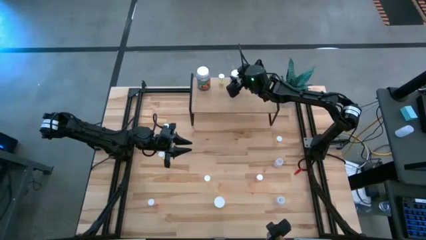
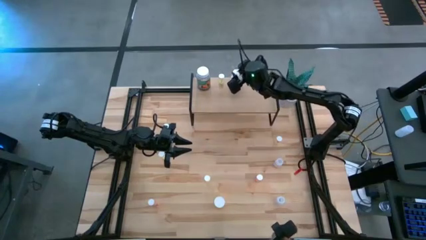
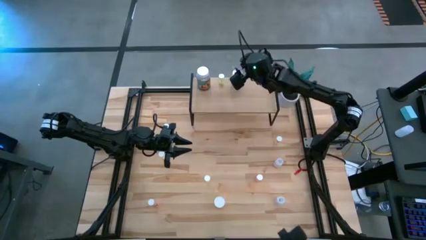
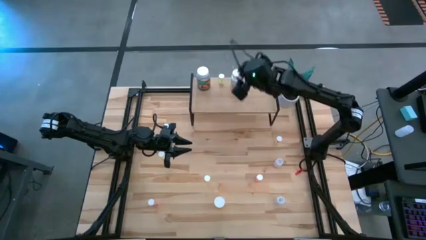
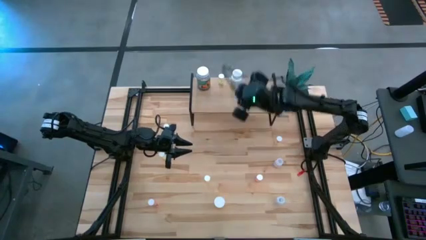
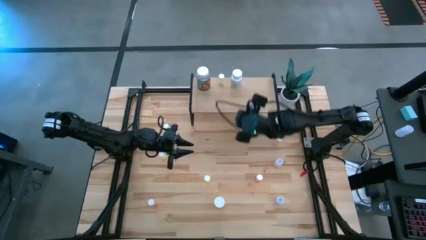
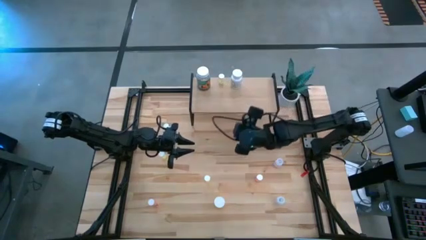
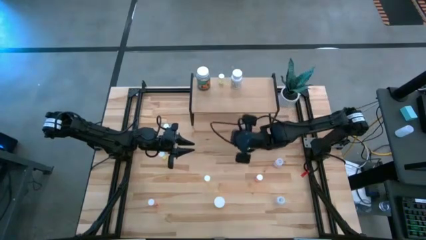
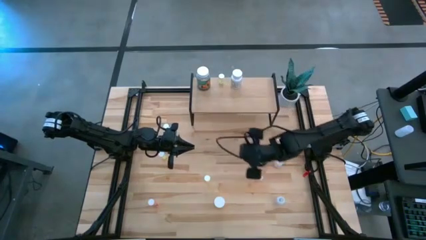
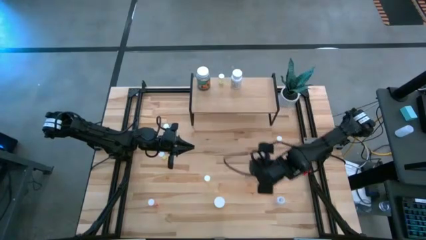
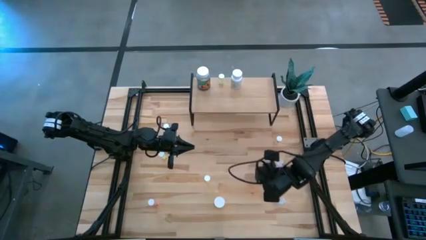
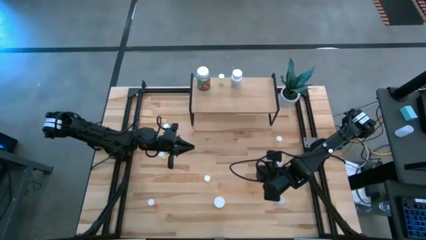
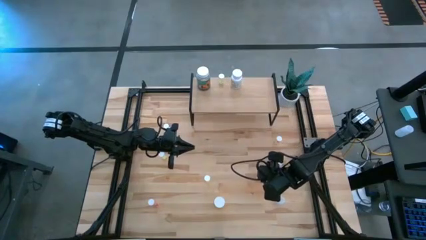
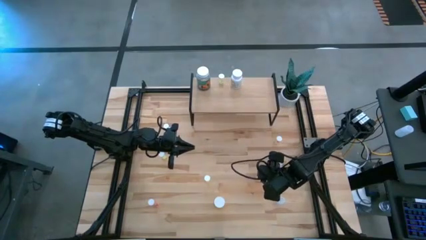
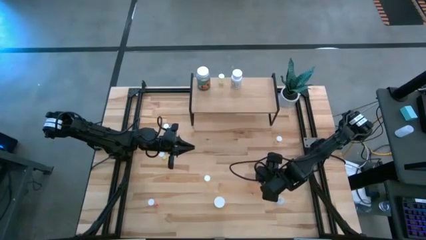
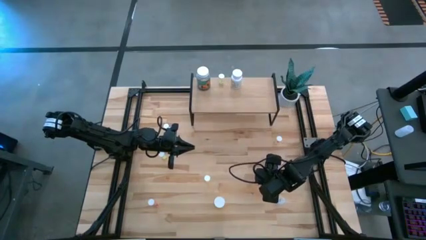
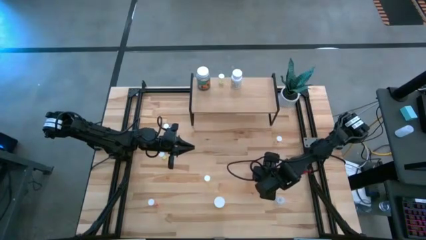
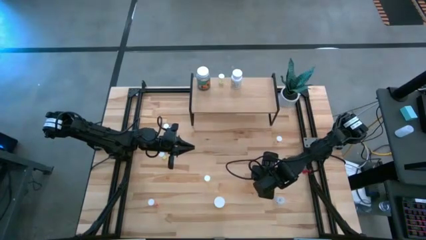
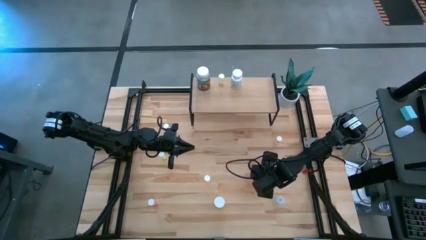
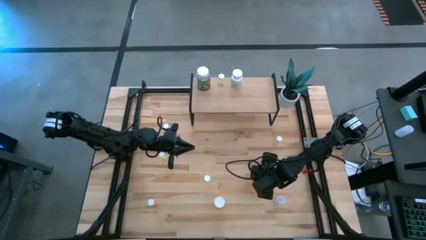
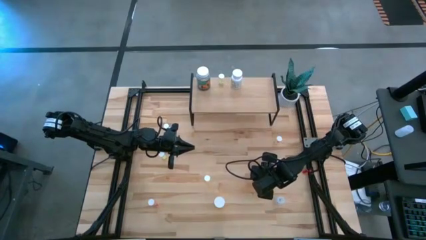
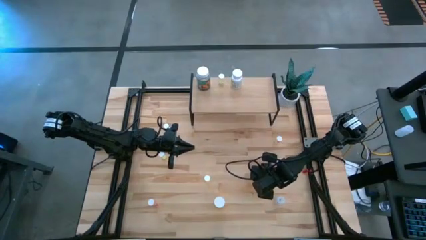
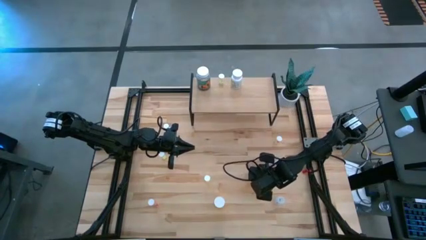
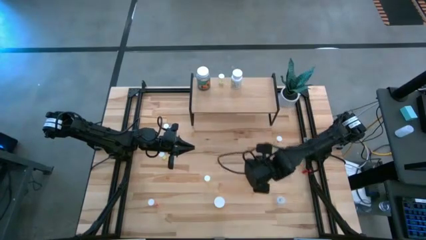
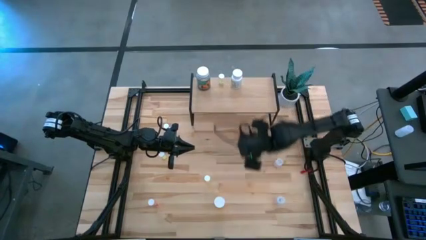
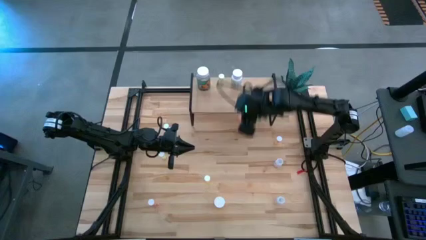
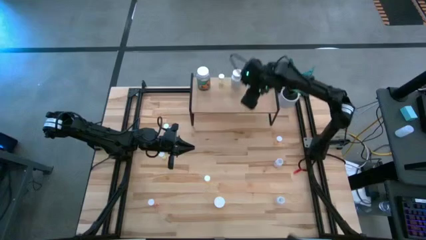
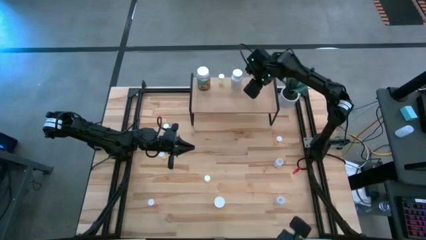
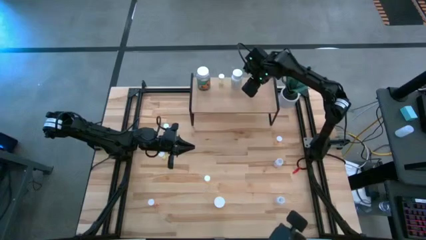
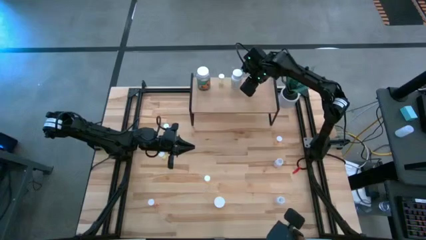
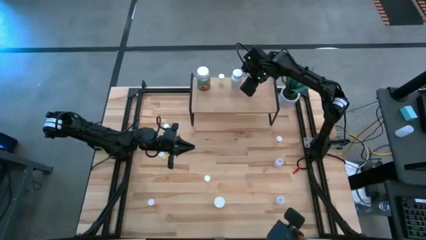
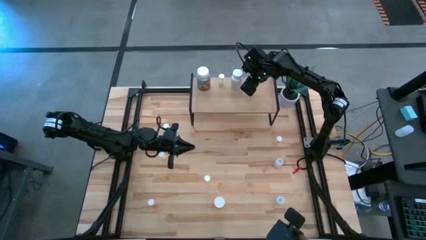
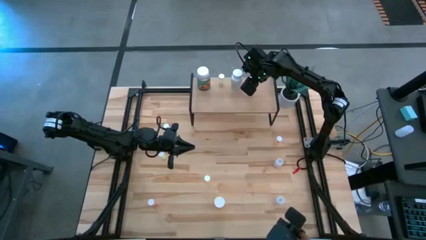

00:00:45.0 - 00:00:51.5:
Task: Pick and place medicine bottles onto shelf by color
Put the bottom right pink pill bottle on the shelf

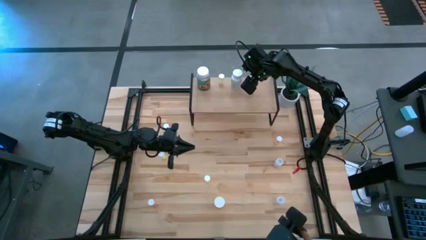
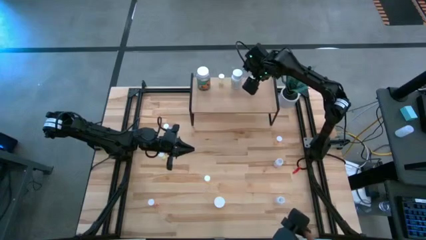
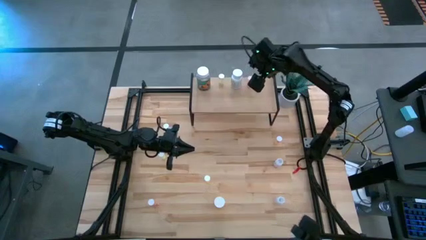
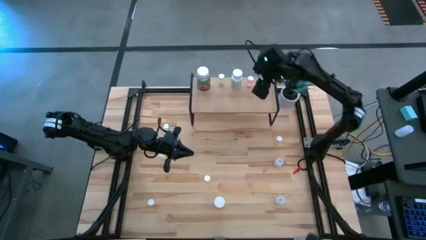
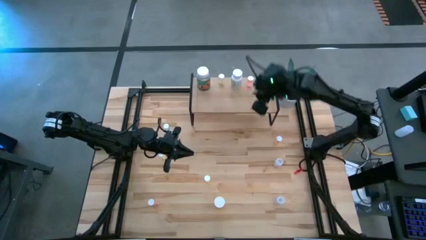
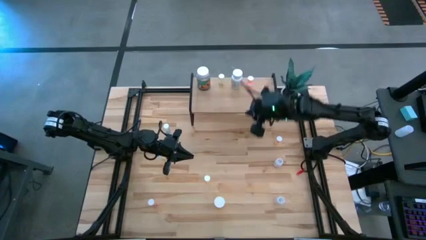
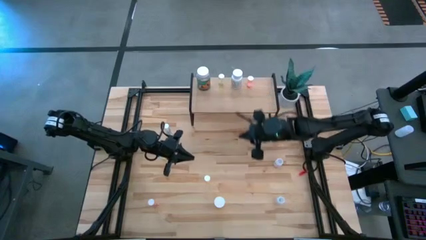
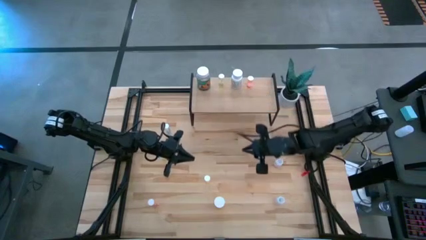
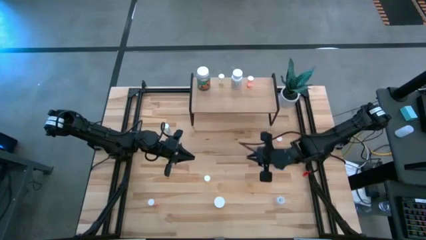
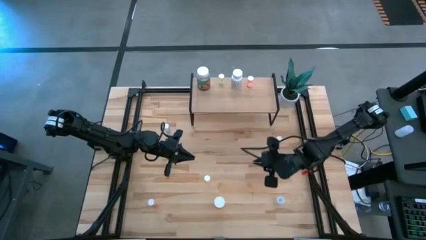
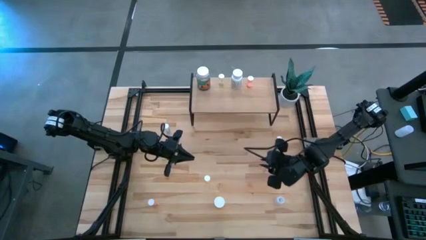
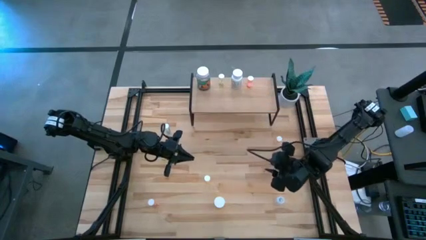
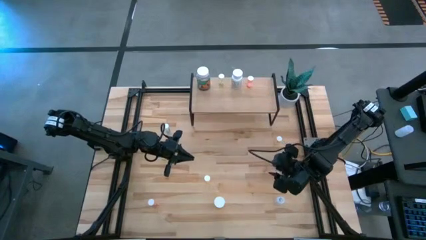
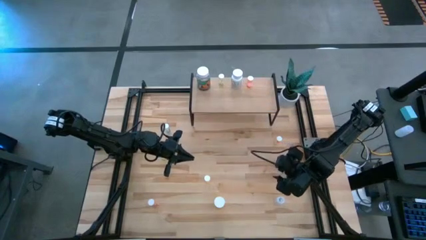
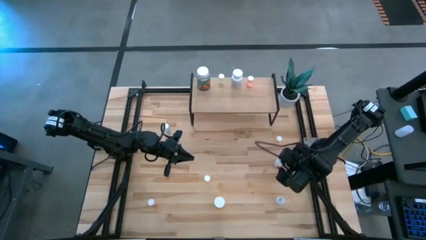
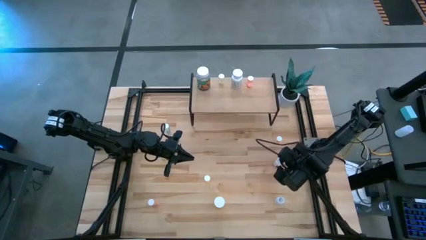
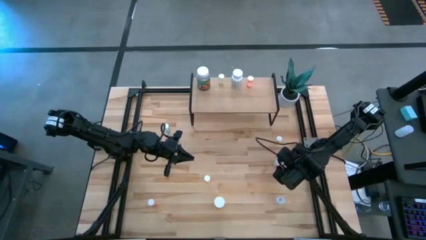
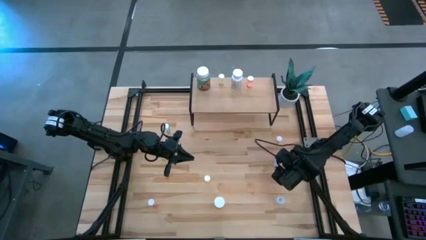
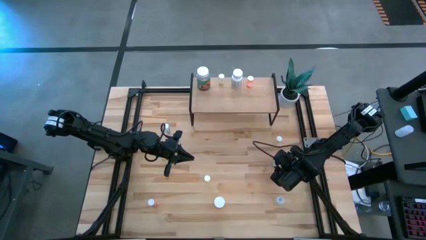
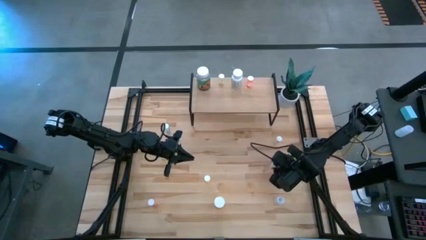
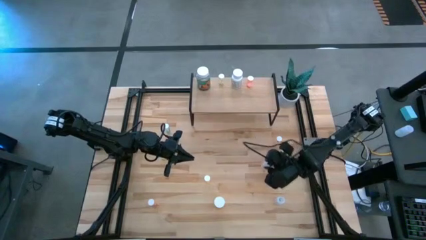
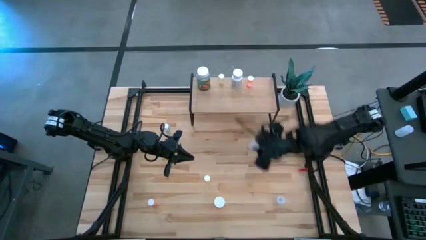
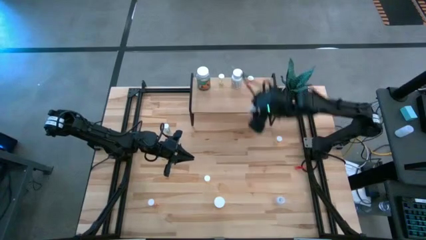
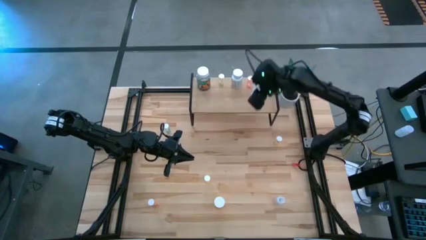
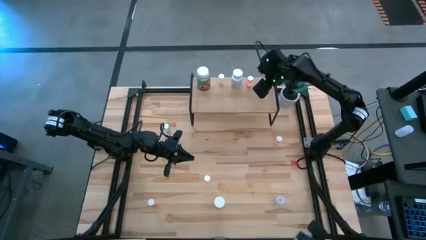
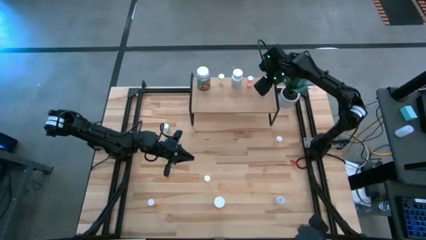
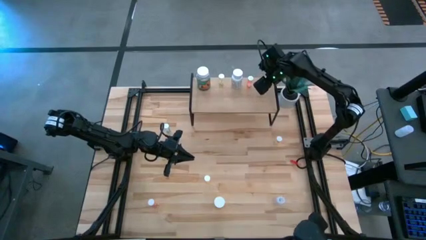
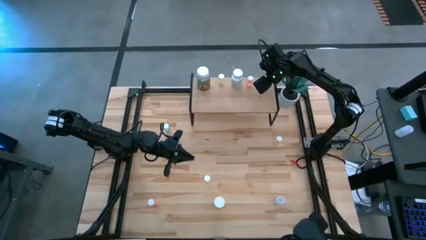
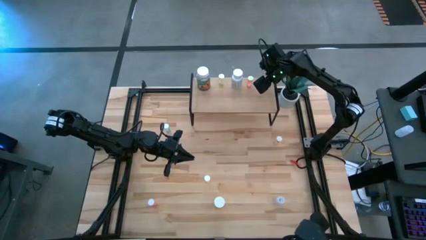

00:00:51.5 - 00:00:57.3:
Put the transparent pill bottle on the shelf

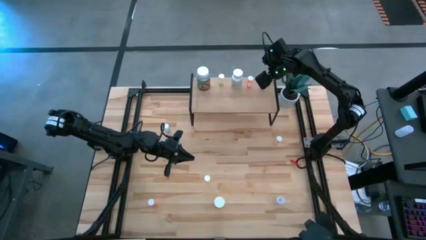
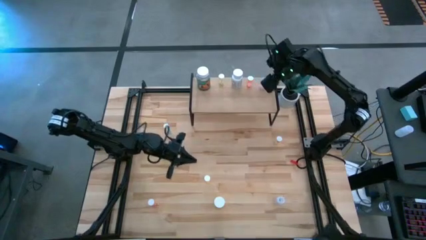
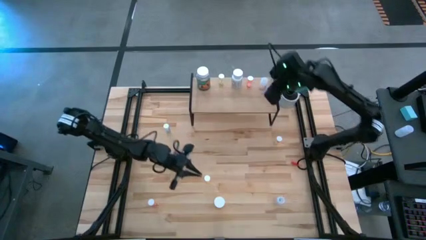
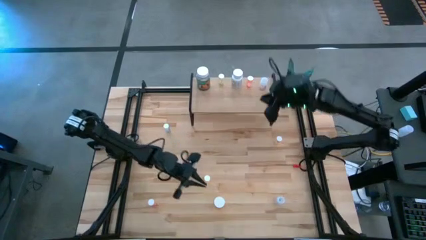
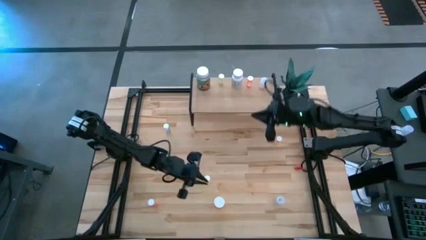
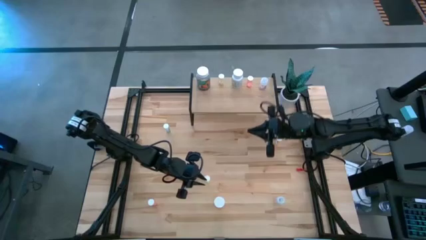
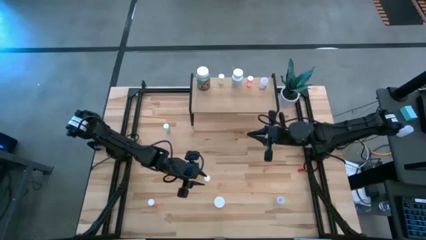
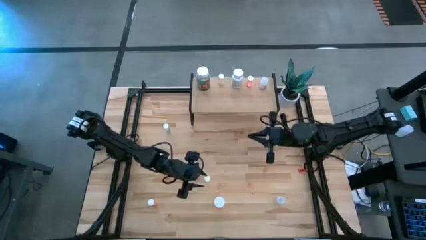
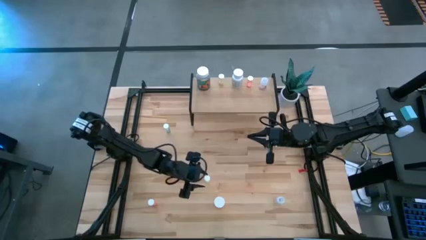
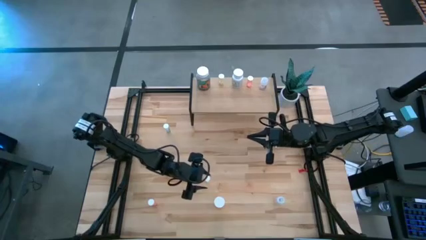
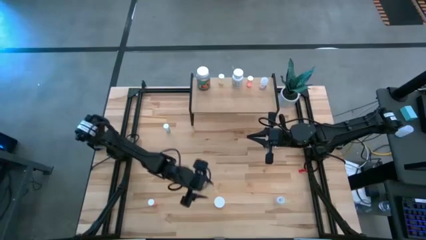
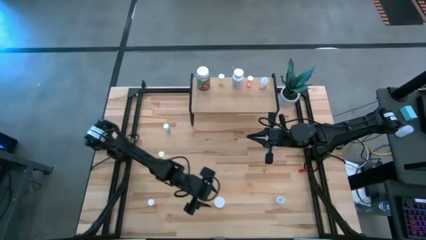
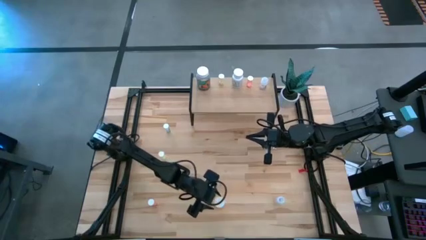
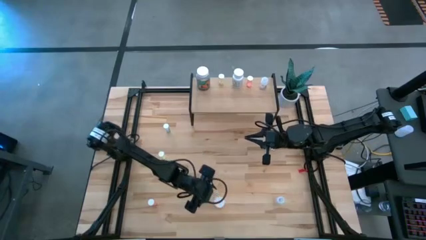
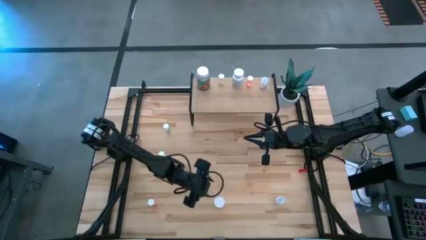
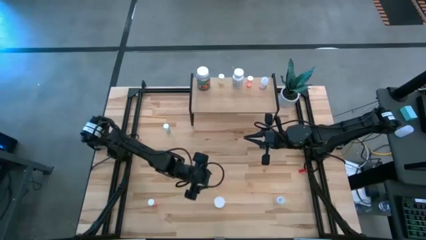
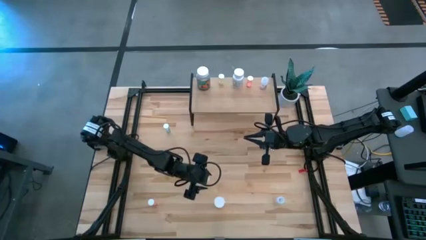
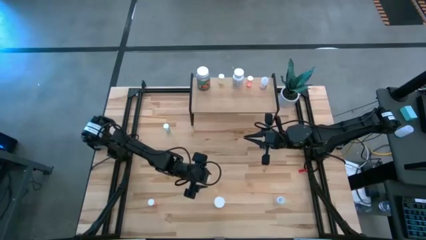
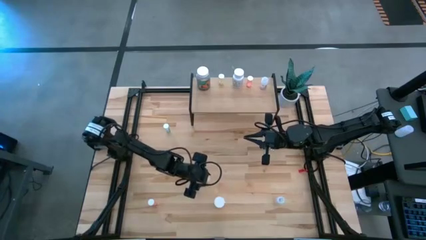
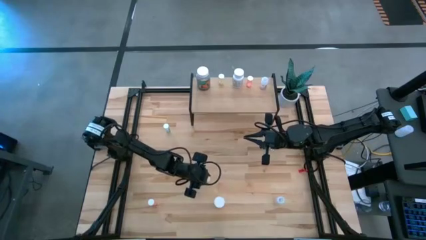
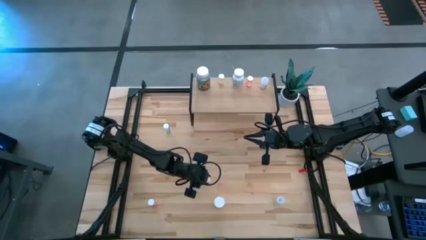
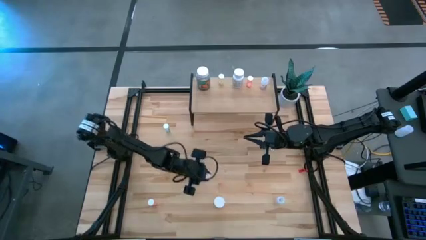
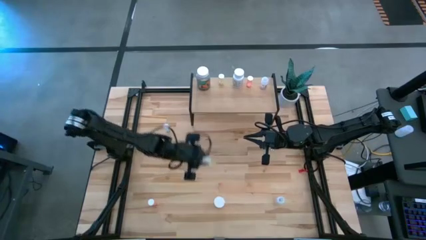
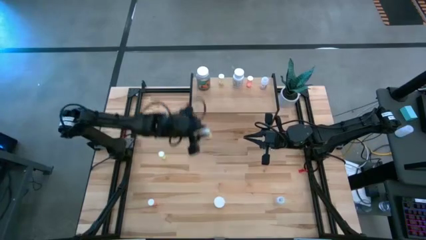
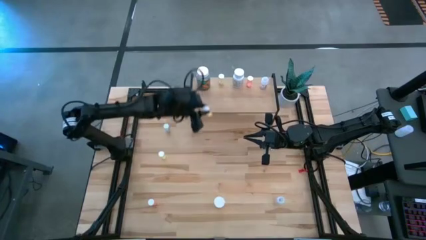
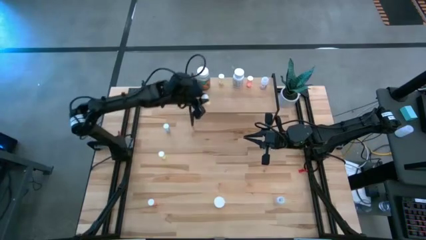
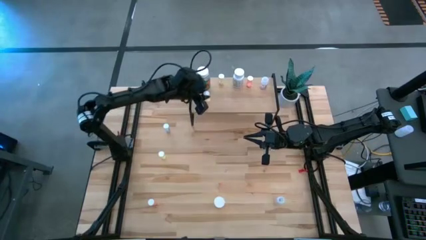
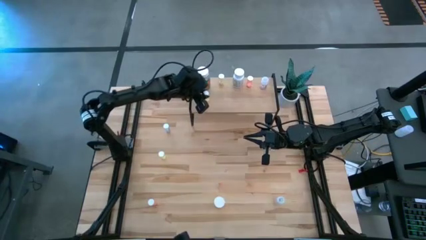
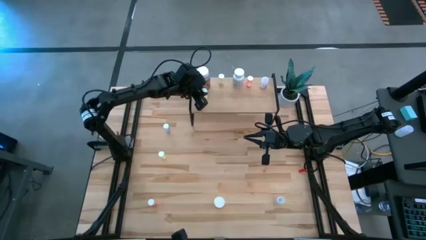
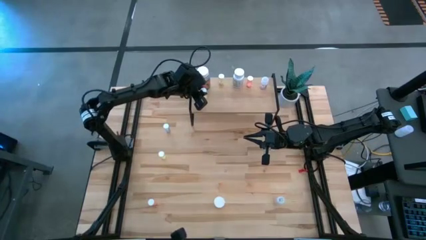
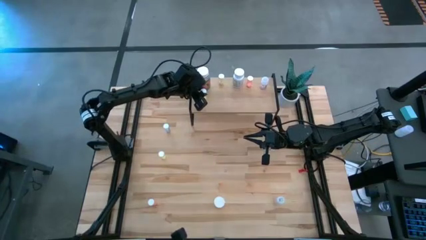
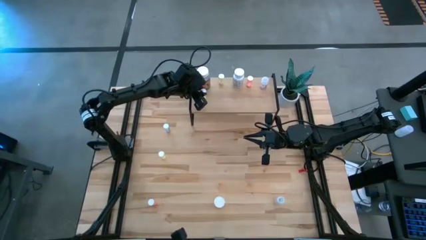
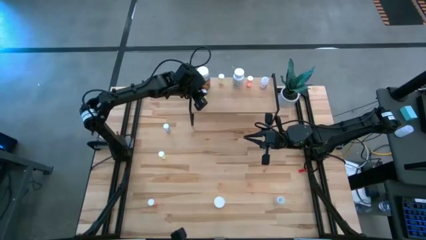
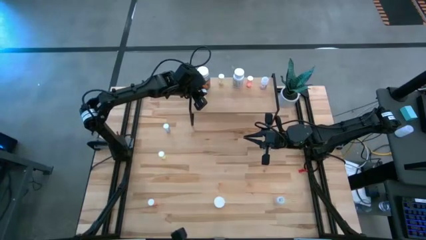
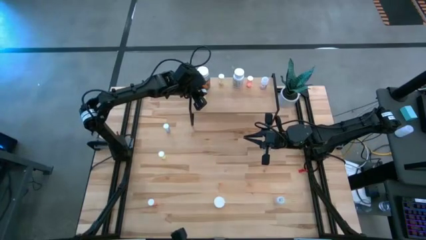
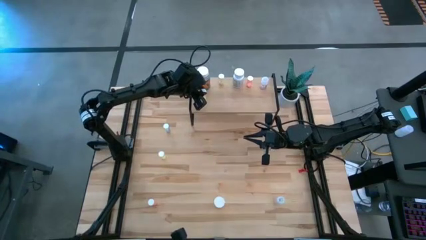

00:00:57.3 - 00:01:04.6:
Put the bottom yellow pill bottle on the shelf
